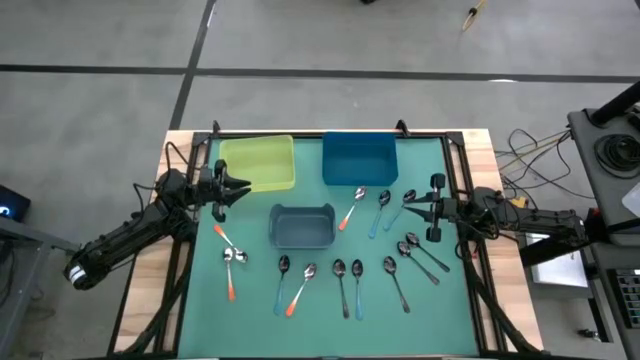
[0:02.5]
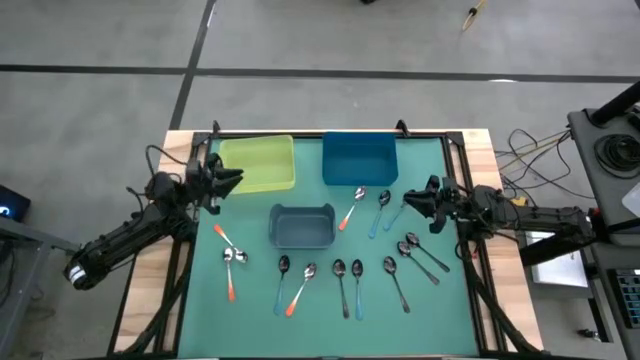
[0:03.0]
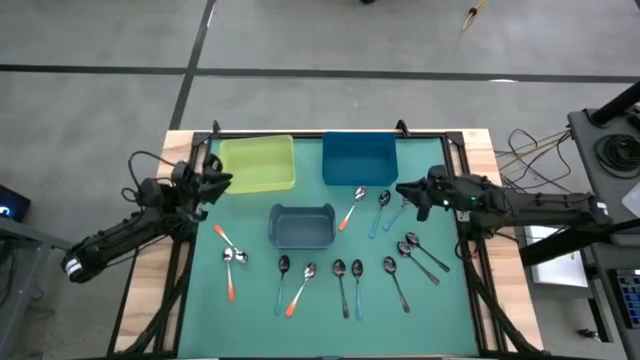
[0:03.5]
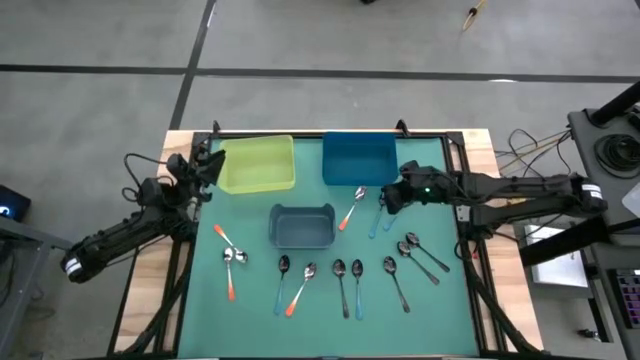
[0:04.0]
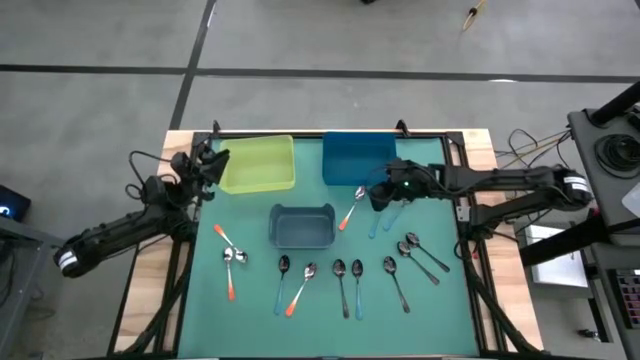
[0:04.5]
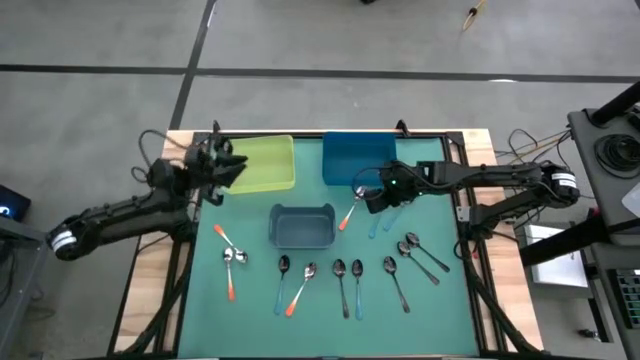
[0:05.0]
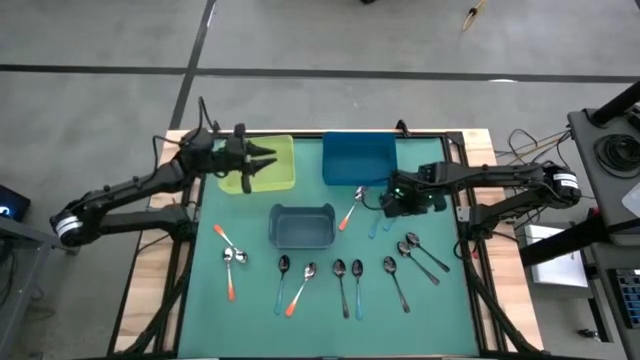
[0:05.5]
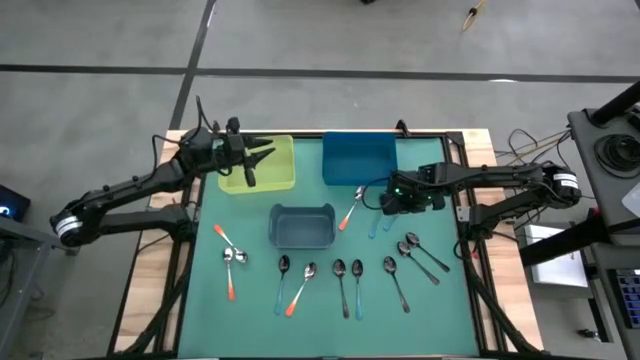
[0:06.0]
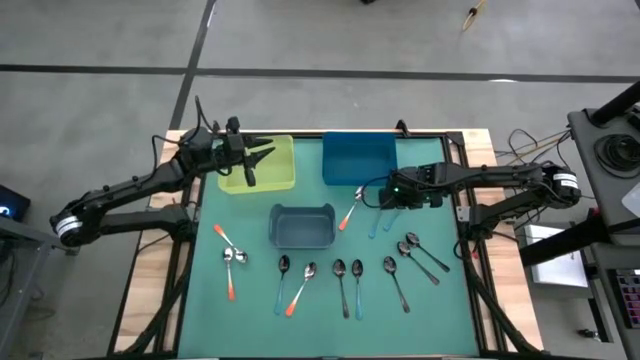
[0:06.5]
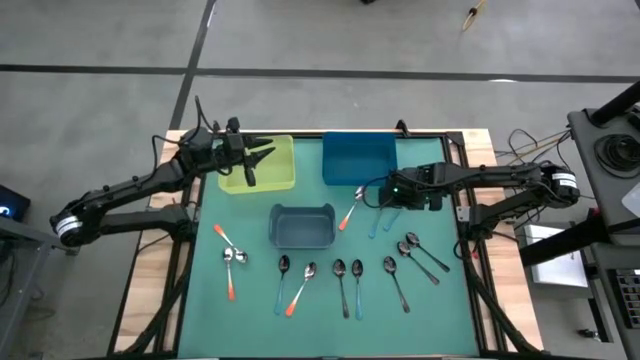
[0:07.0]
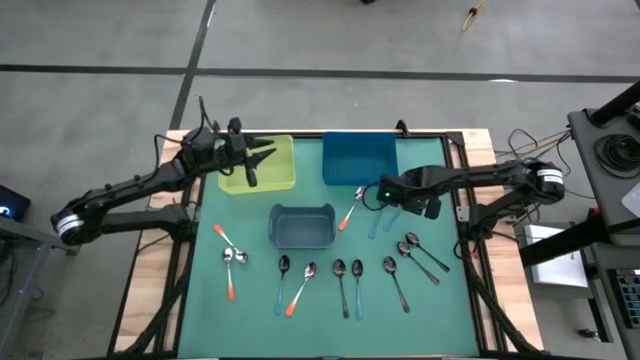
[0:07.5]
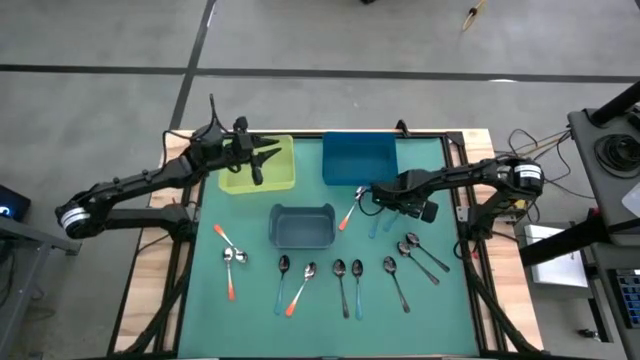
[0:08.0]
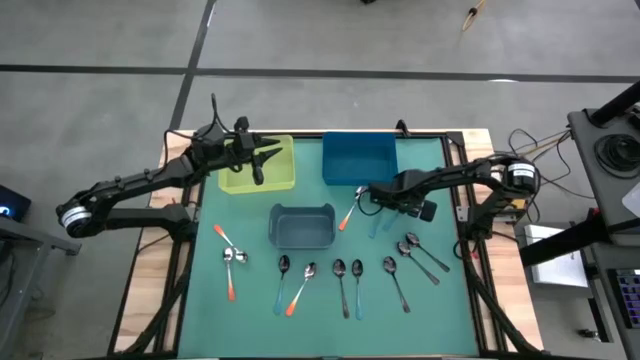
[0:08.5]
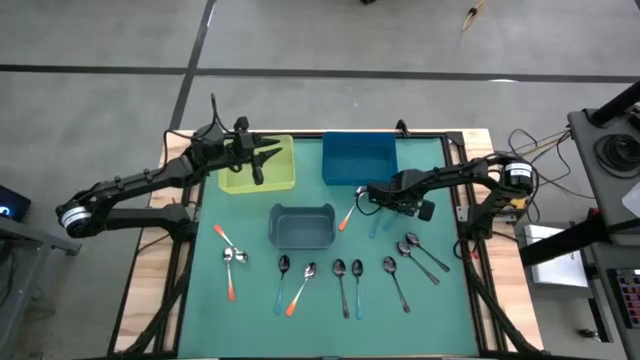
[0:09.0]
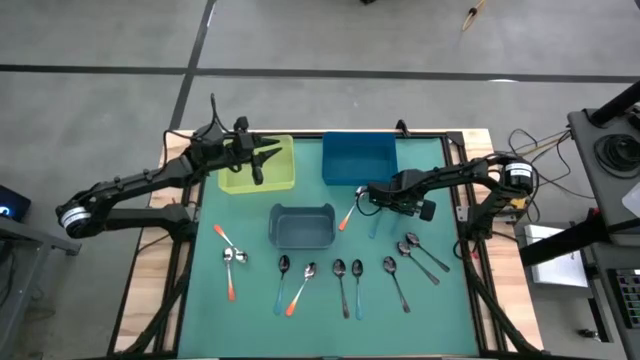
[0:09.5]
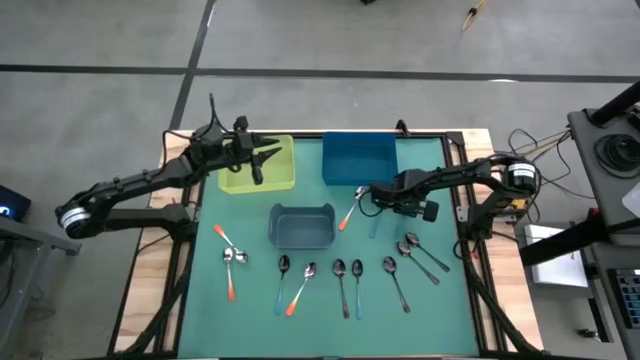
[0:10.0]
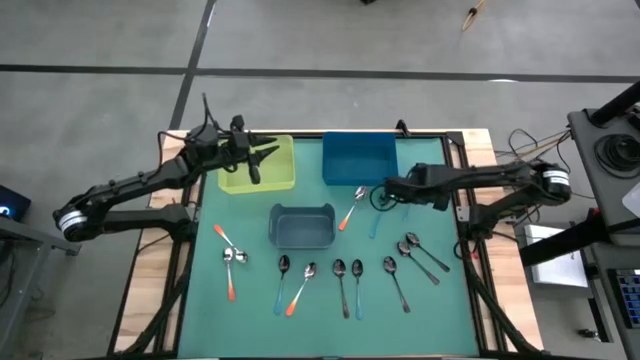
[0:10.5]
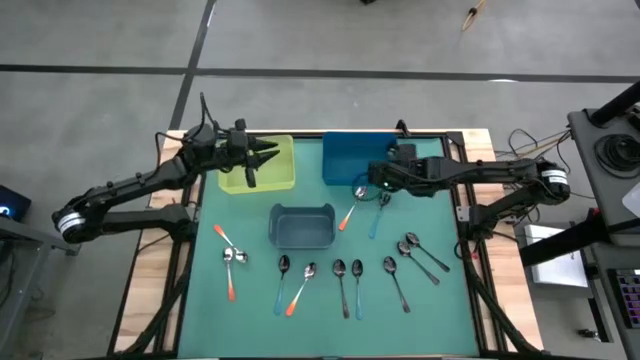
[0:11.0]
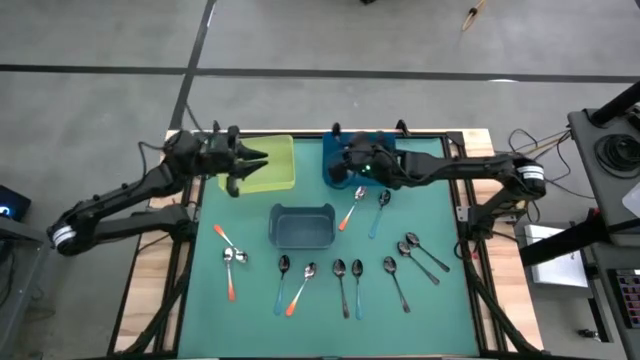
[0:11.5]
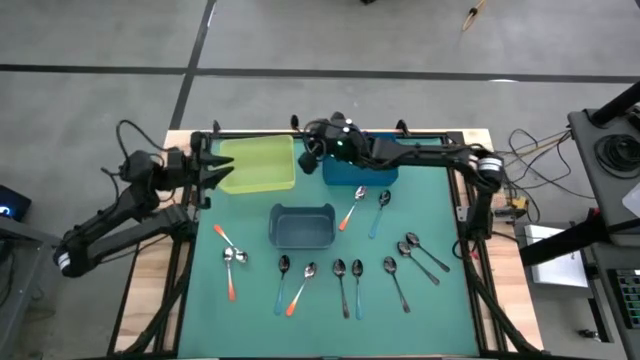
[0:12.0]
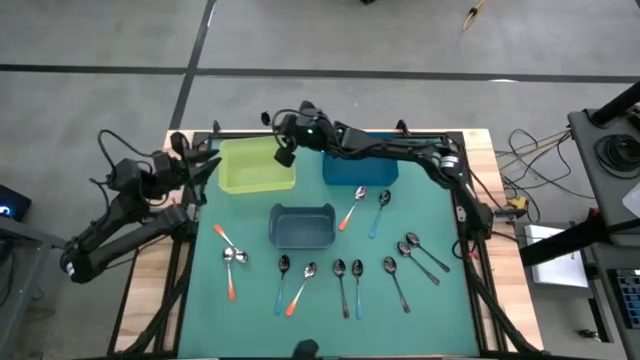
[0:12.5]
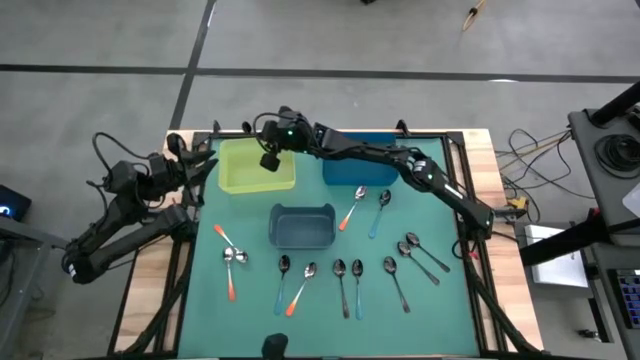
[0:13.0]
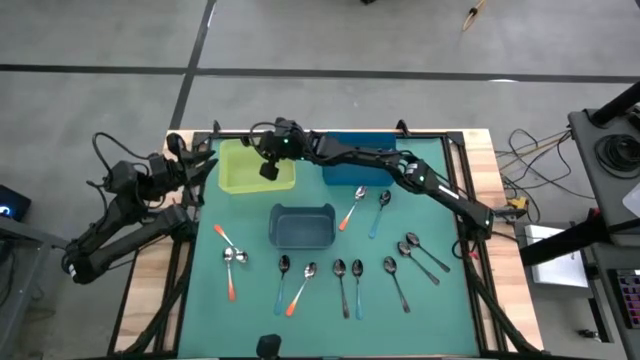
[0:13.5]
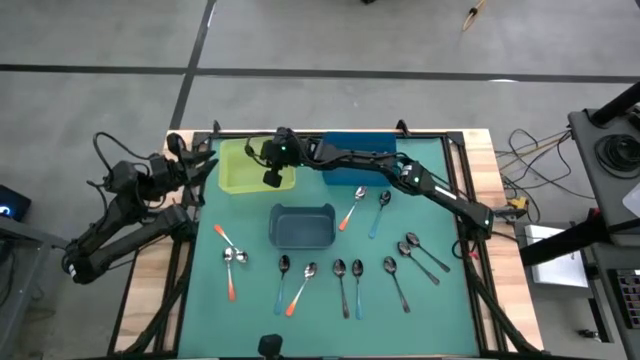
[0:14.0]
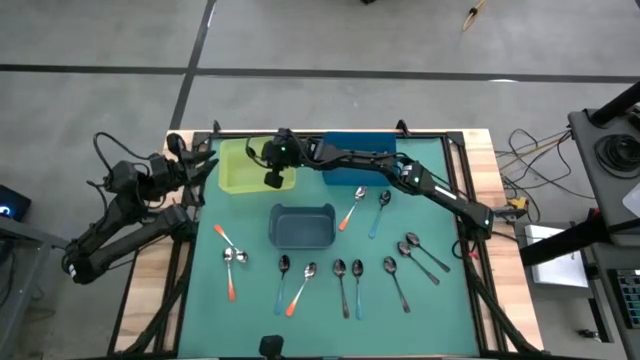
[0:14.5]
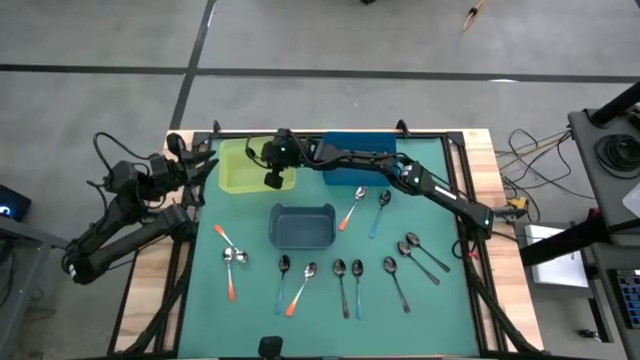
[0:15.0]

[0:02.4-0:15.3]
Task: Sort silverware by color (type)
Put the blue spoon into the green bin

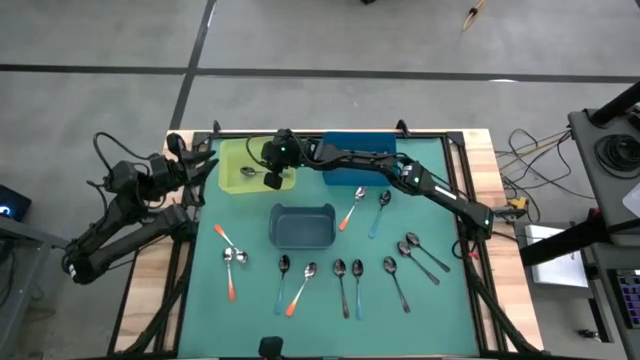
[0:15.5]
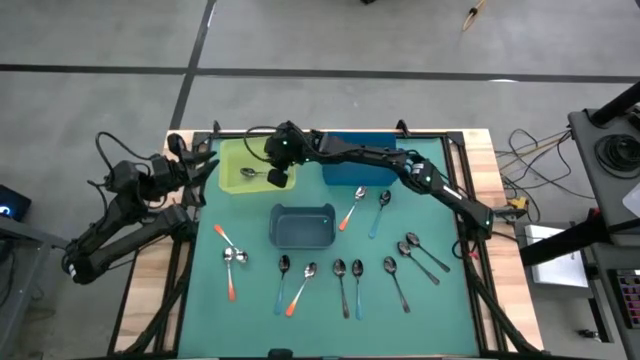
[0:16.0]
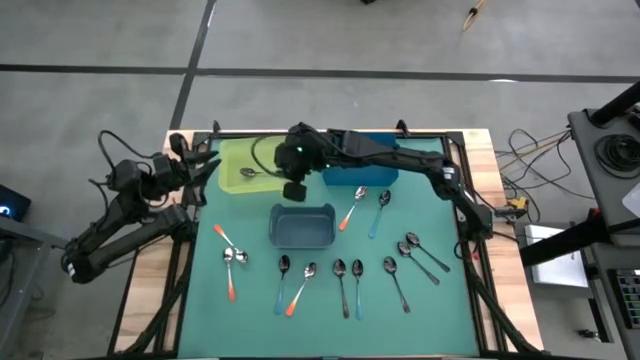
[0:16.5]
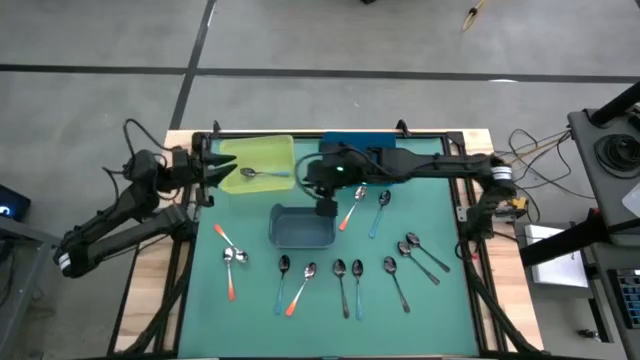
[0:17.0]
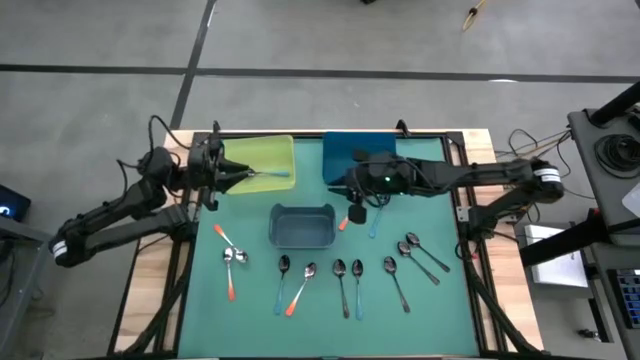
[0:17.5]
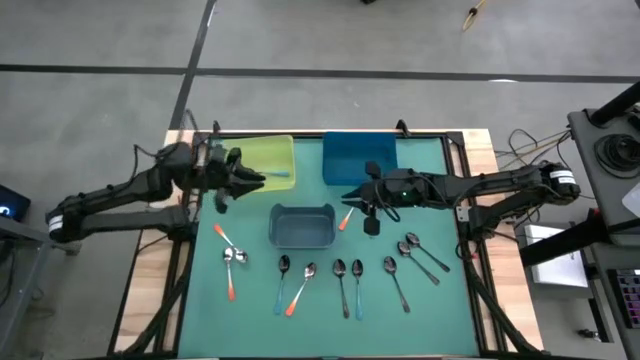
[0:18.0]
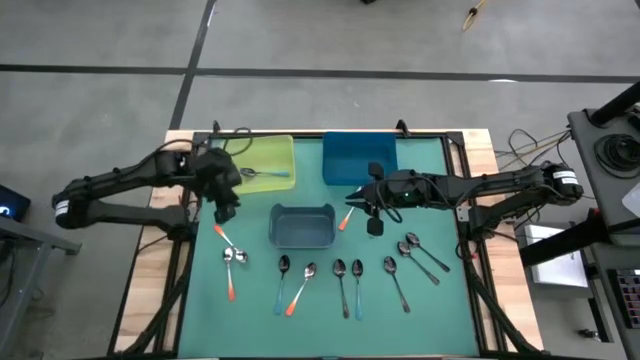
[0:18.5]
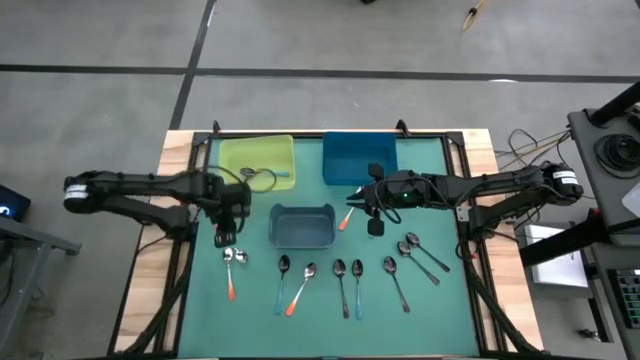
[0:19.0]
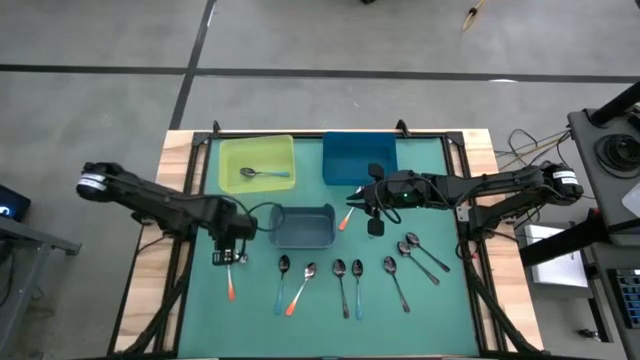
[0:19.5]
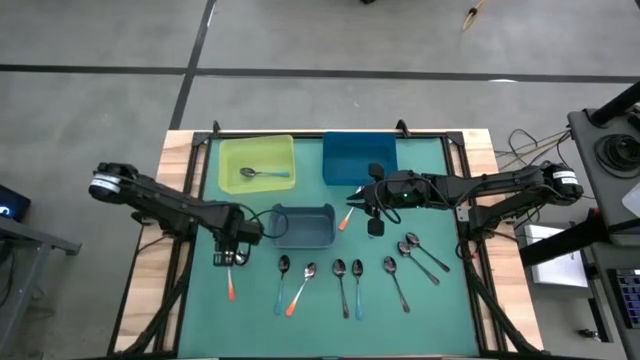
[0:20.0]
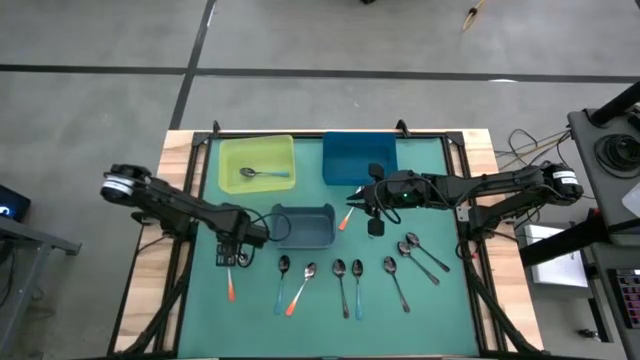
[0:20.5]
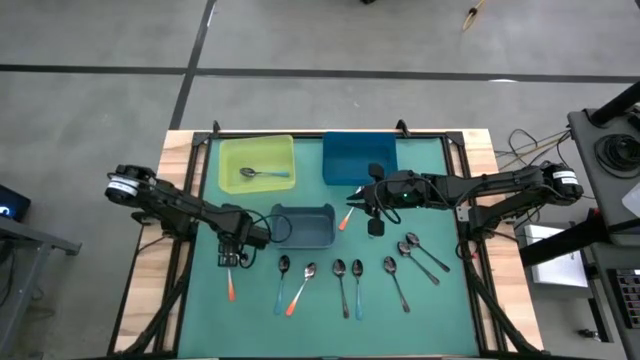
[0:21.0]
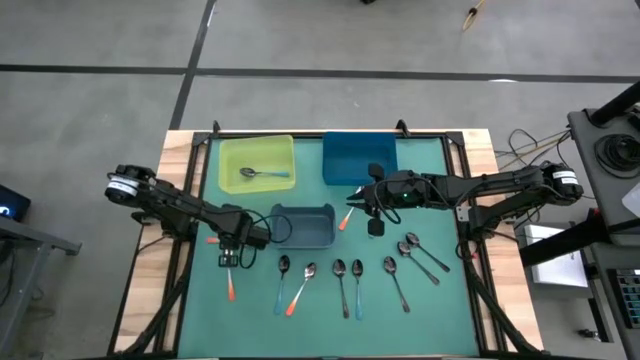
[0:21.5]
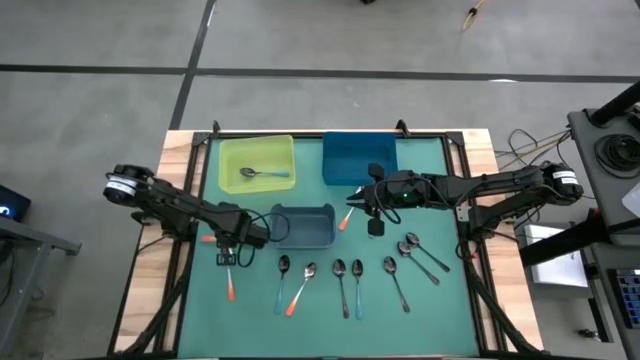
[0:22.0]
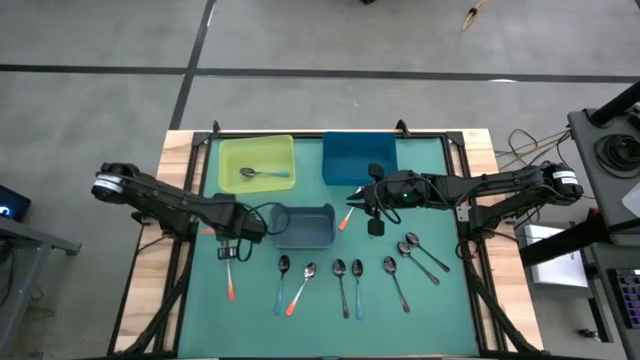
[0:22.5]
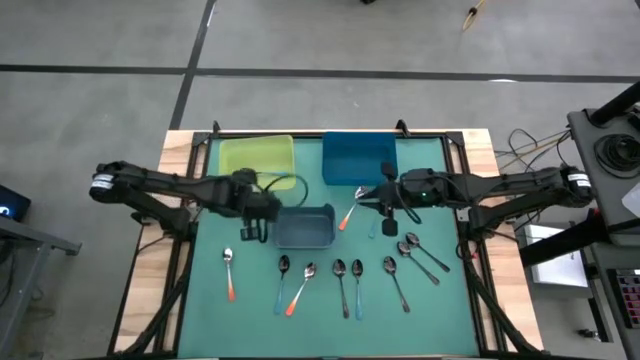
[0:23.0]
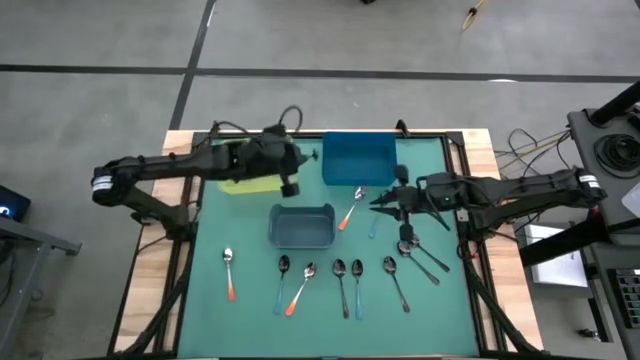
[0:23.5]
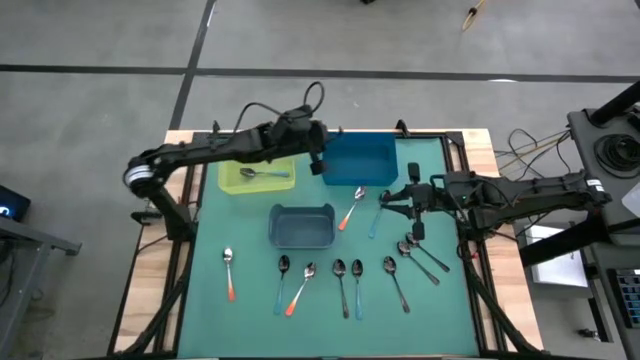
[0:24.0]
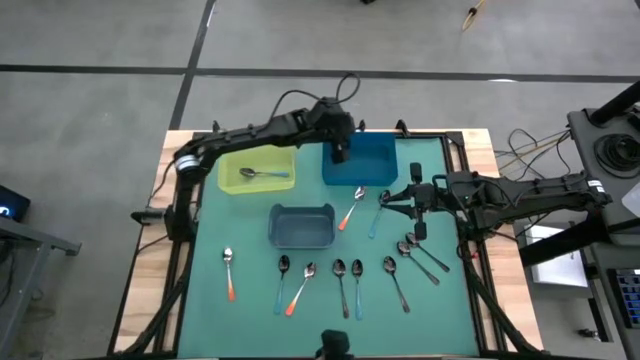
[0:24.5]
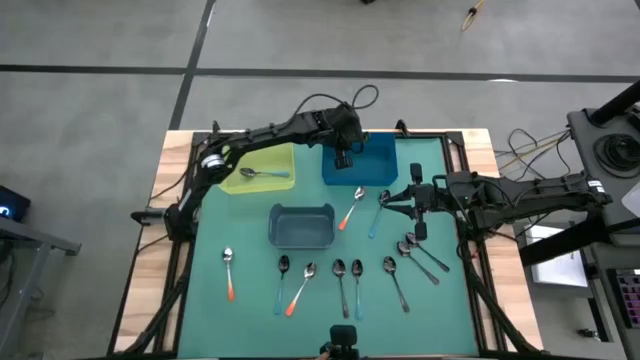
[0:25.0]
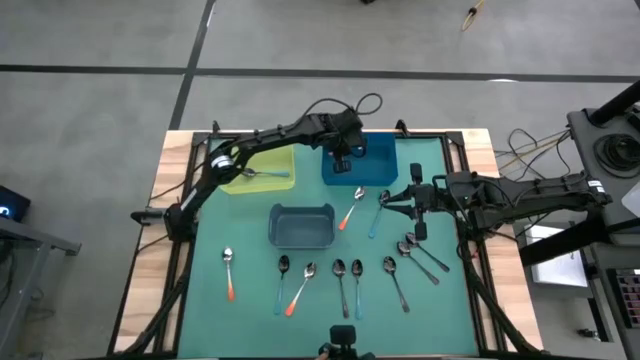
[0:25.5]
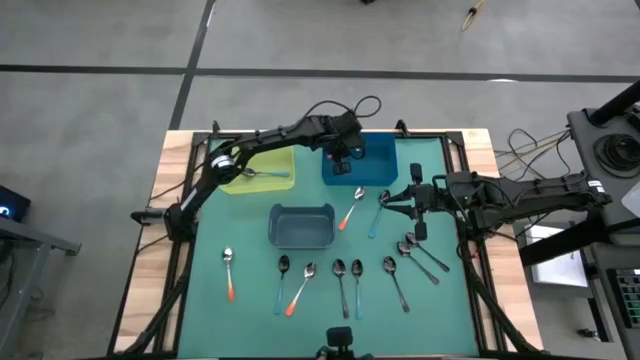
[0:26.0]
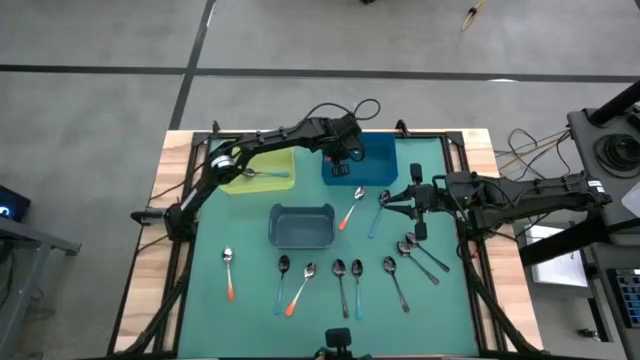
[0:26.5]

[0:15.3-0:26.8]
Put the orange spoon into the blue bin
